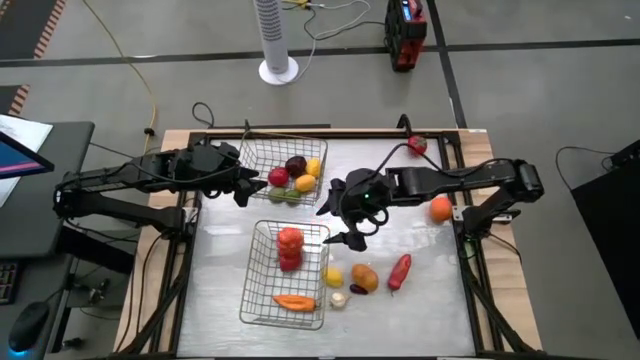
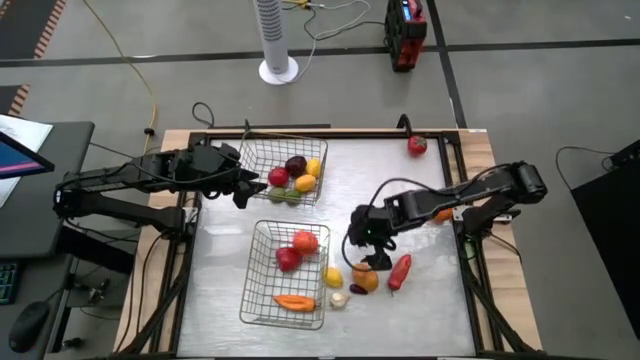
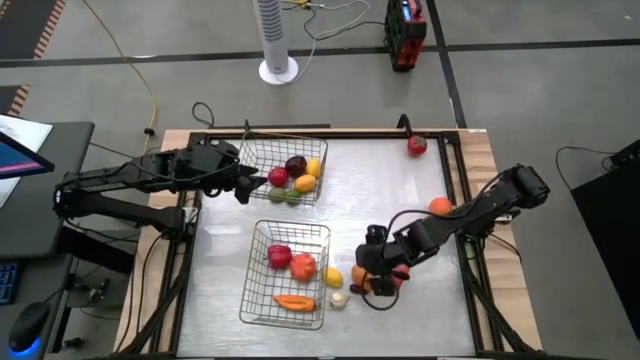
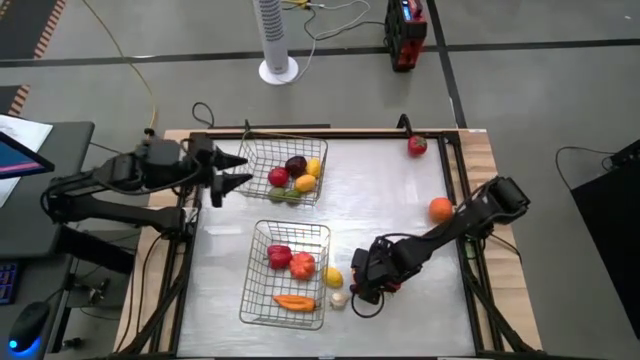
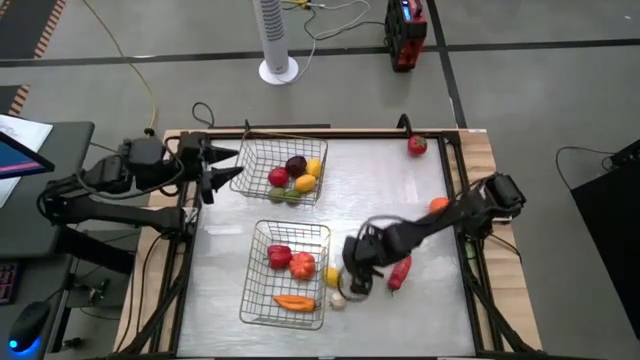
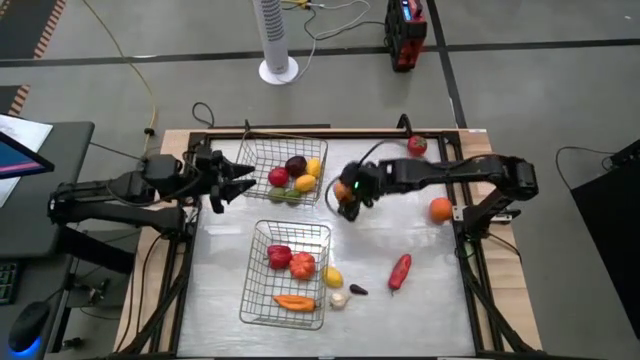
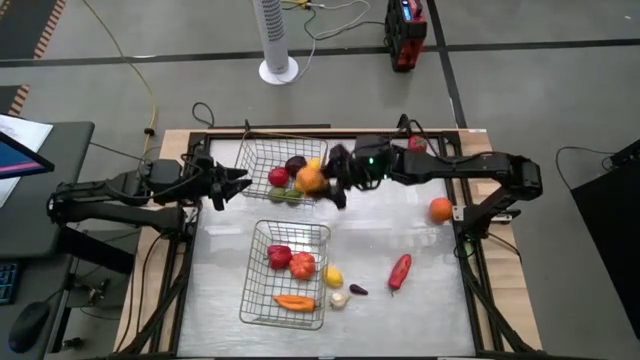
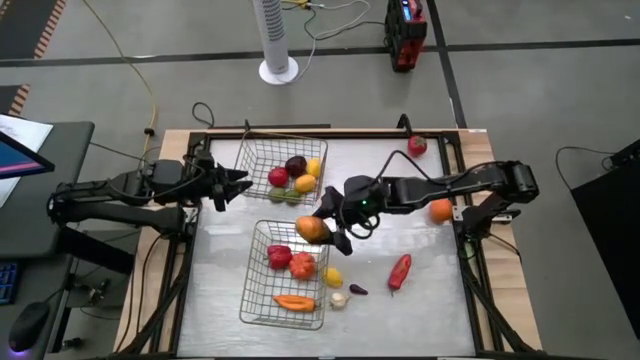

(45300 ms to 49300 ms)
Task: Sort produce into baskets
Put the potato into the bottom wire basket

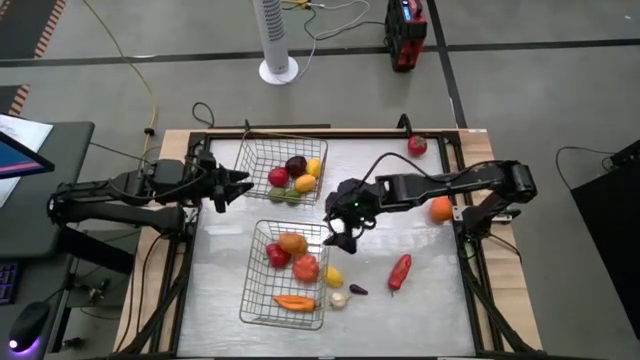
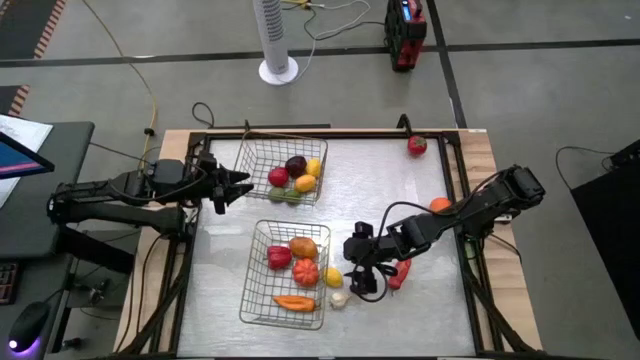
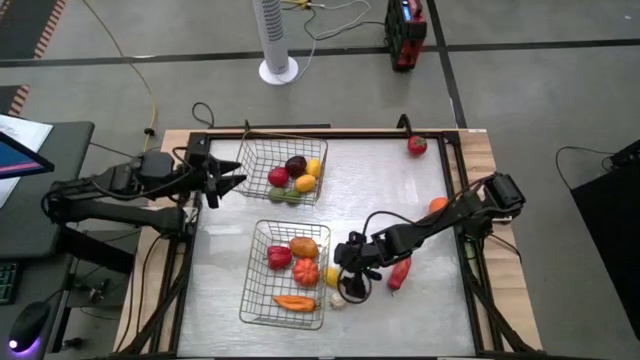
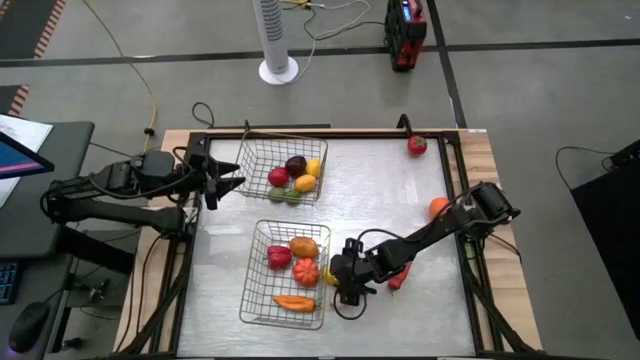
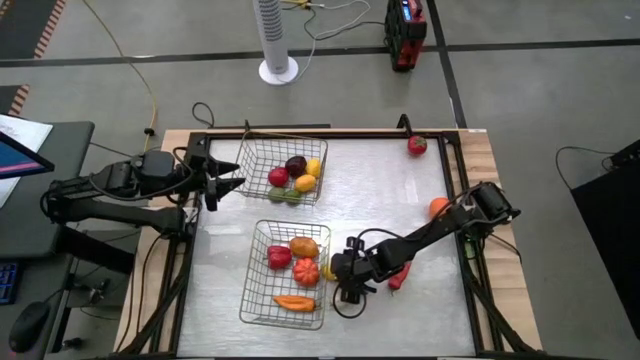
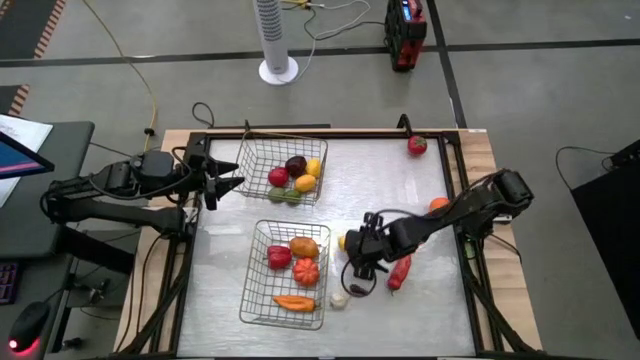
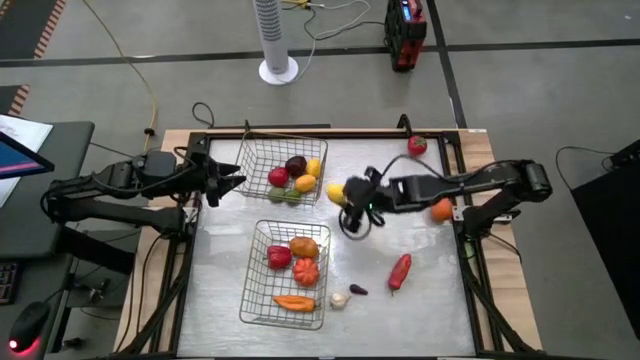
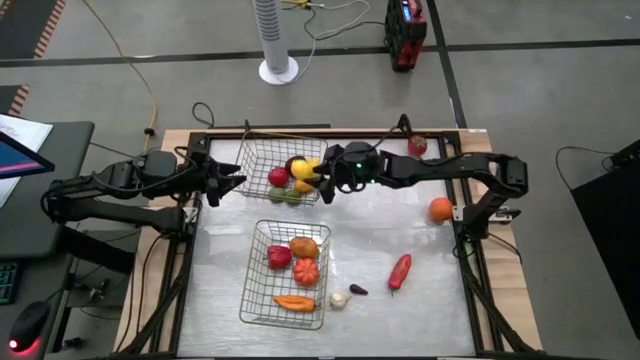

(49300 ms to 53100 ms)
Put the lemon into the top wire basket

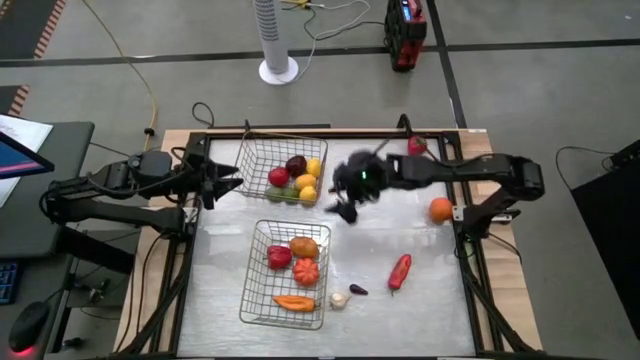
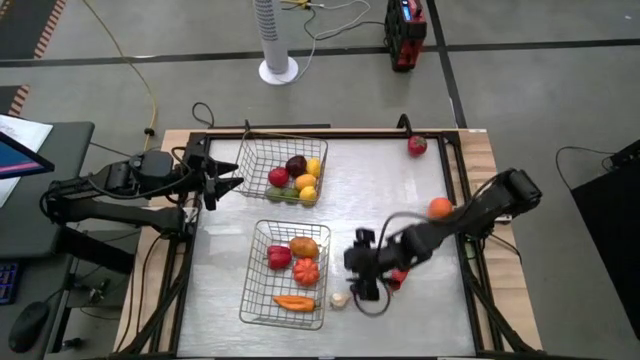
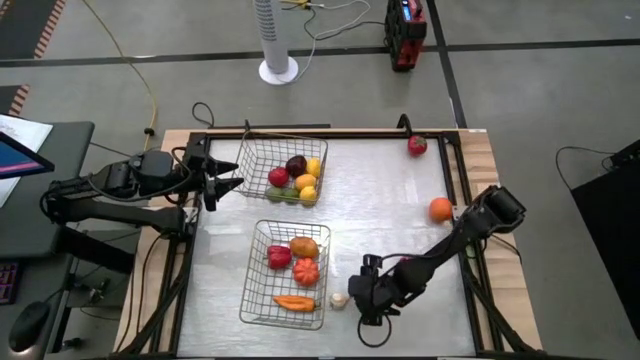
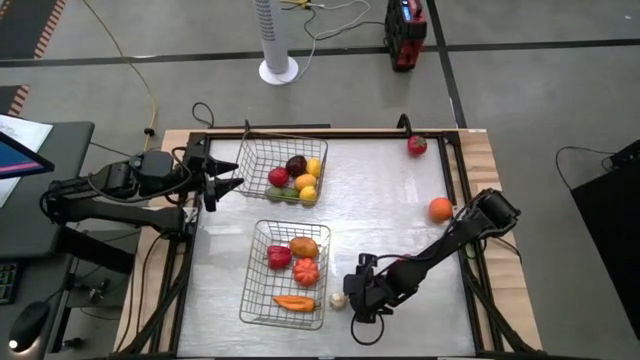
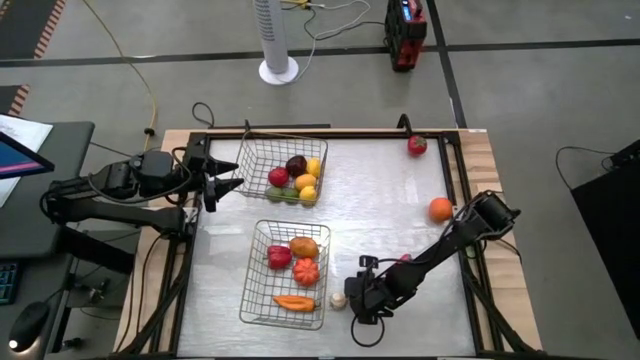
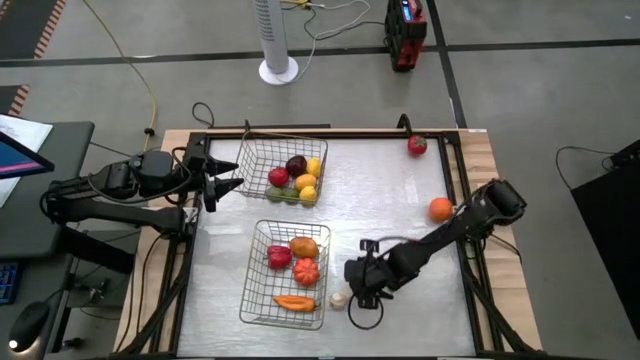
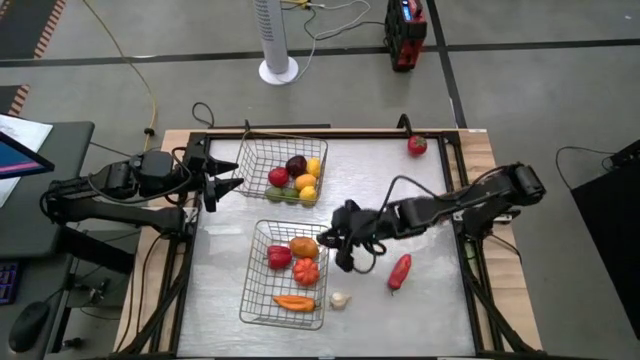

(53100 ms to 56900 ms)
Put the eggplant into the bottom wire basket

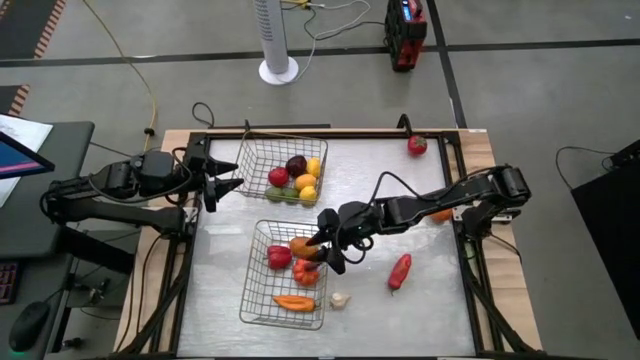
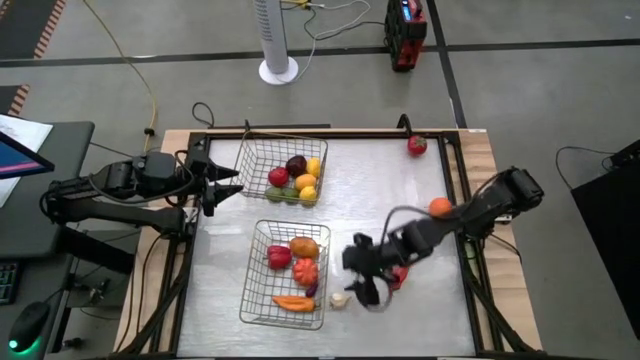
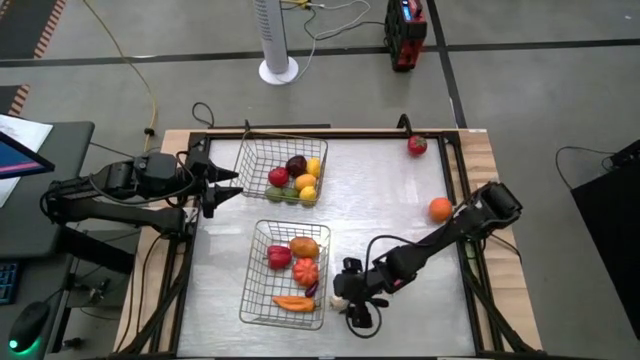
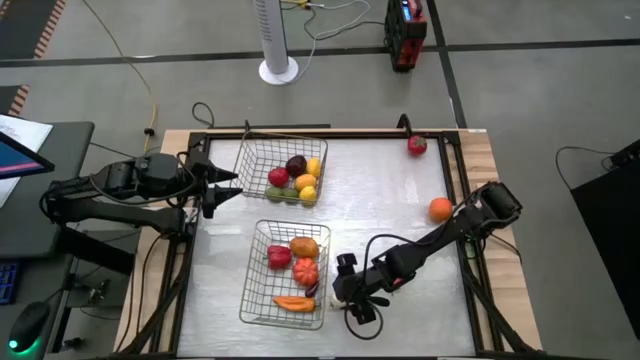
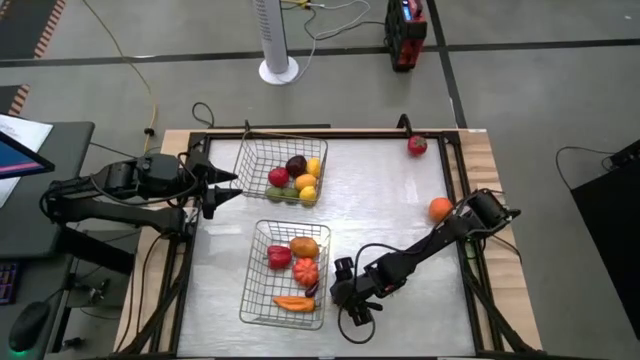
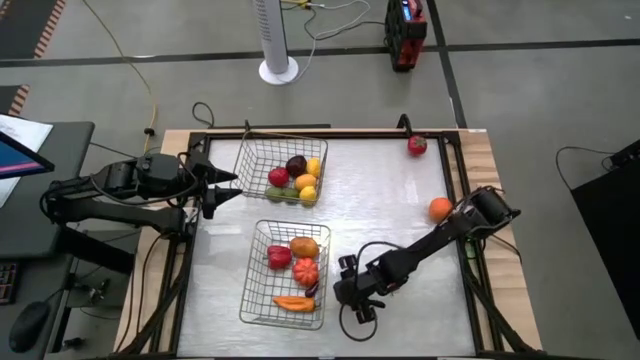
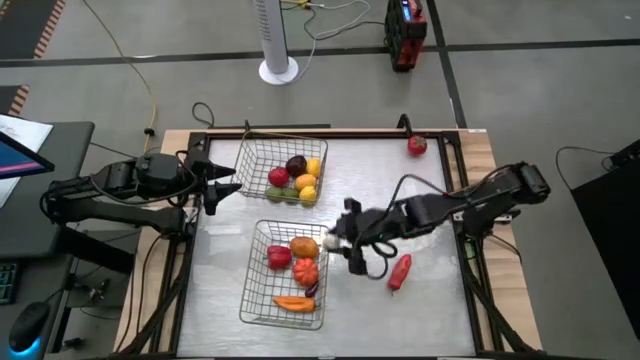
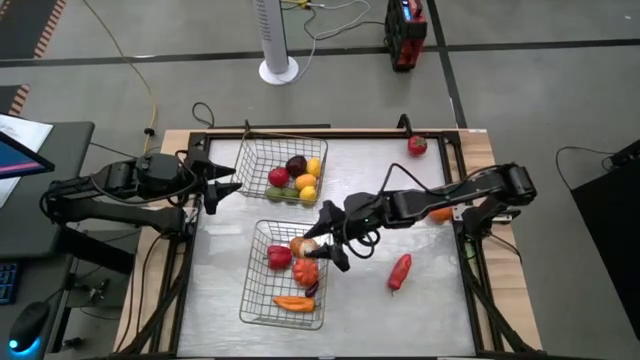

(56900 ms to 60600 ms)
Put the garlic into the bottom wire basket

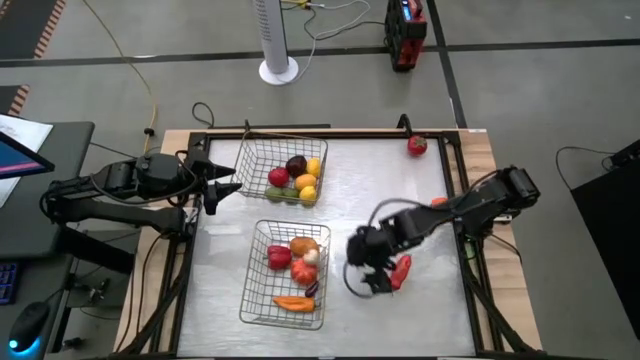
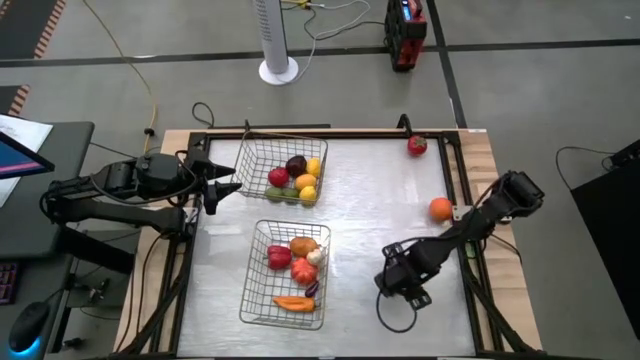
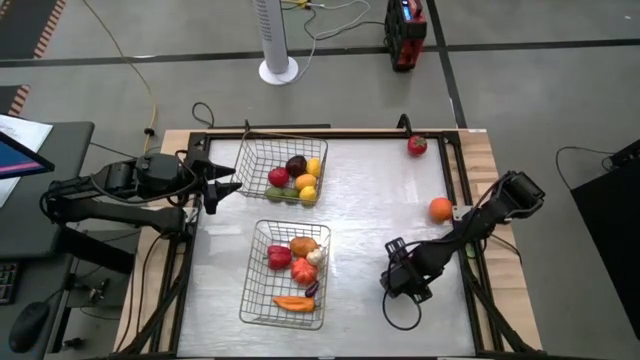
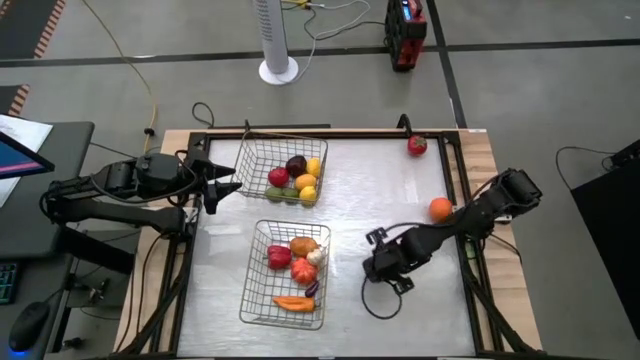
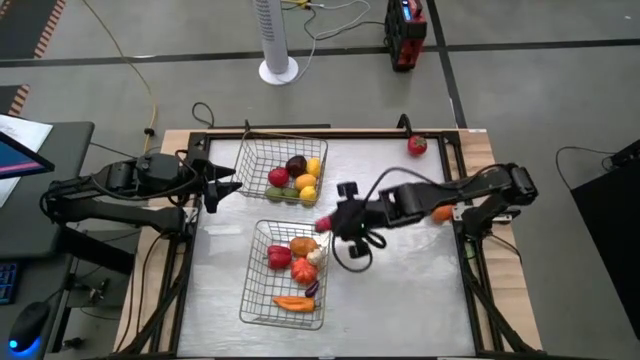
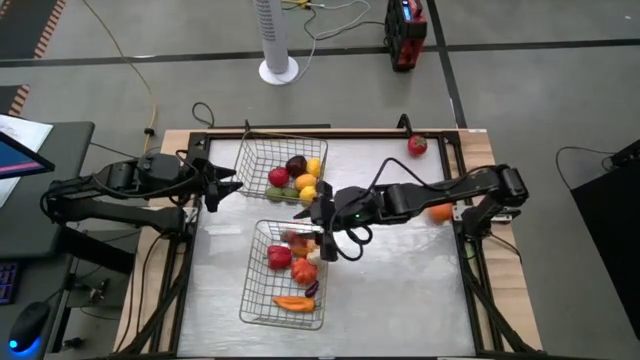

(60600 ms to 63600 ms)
Put the red chilli pepper into the bottom wire basket

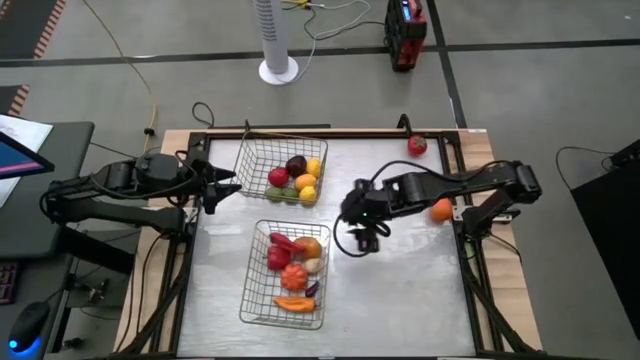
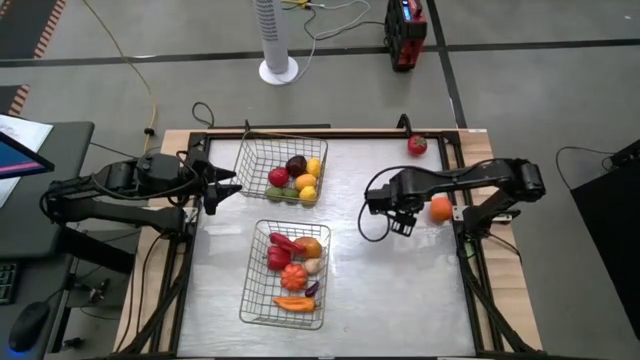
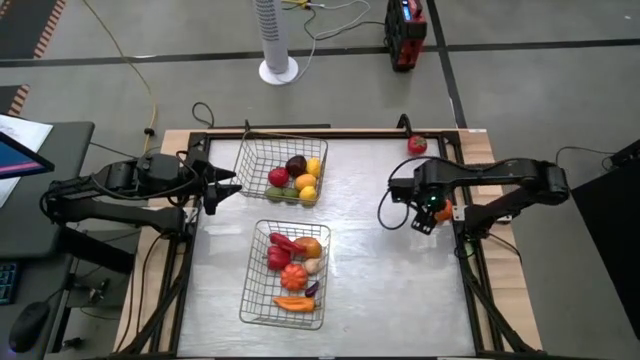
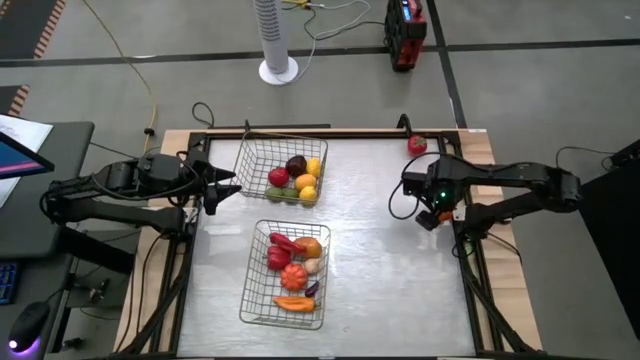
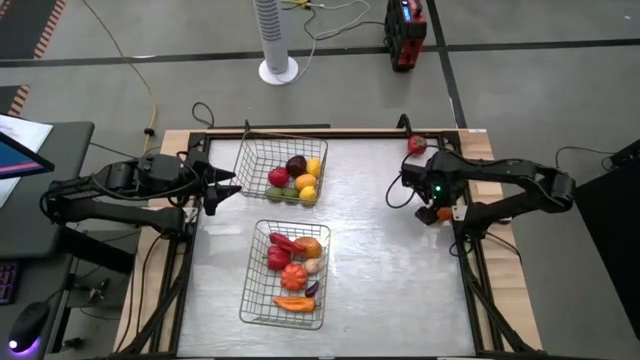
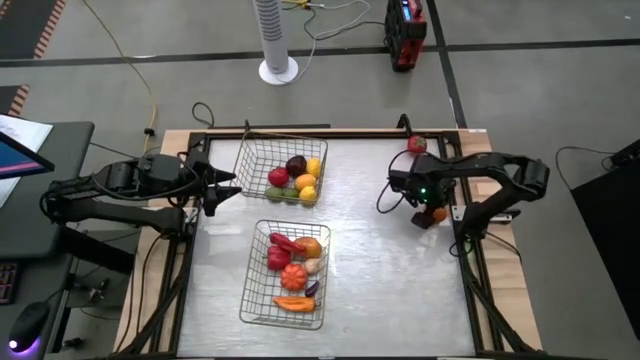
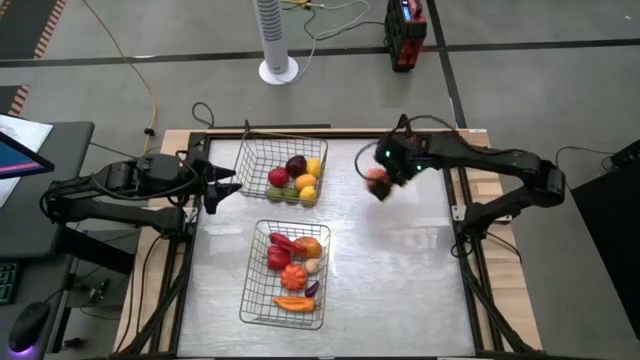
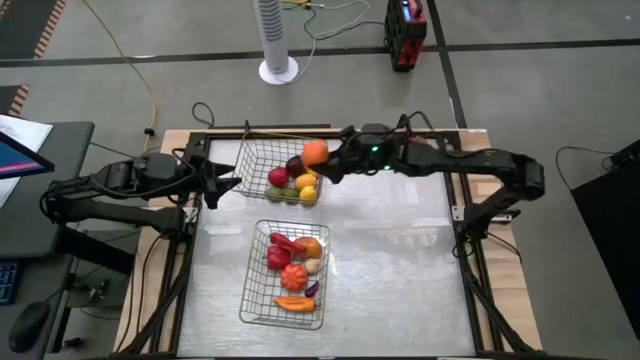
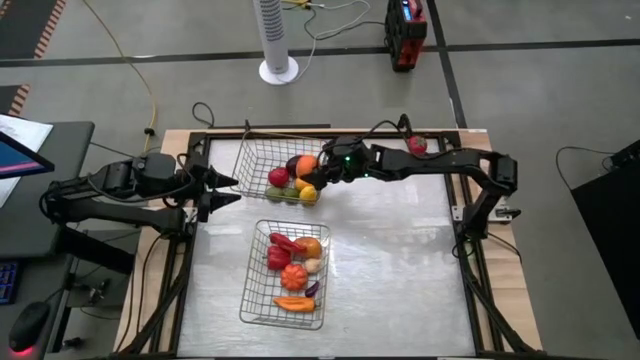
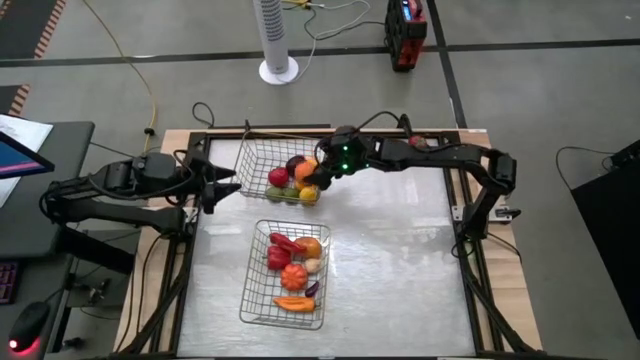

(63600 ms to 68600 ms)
Put the orange into the top wire basket
